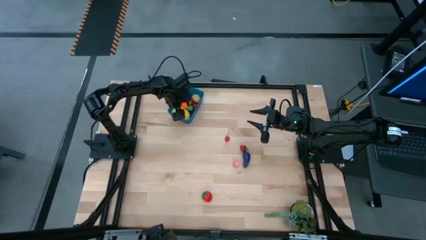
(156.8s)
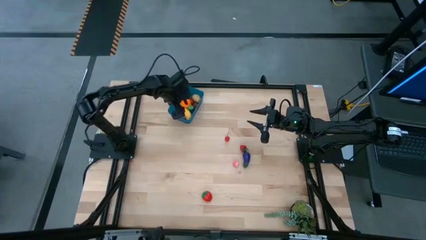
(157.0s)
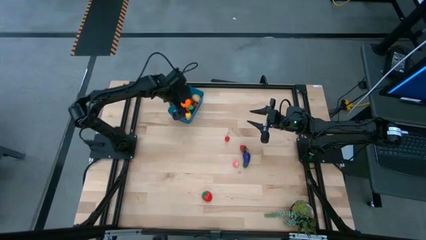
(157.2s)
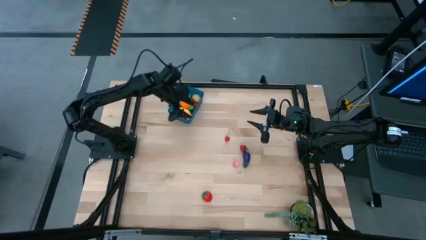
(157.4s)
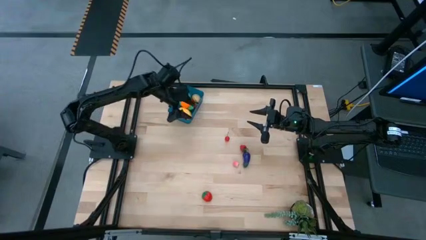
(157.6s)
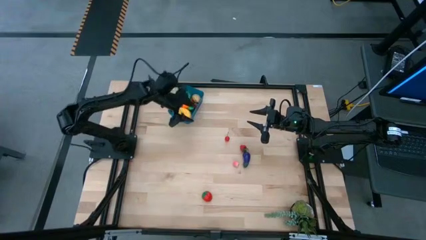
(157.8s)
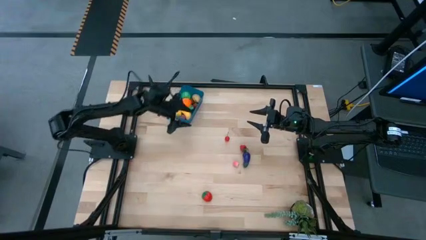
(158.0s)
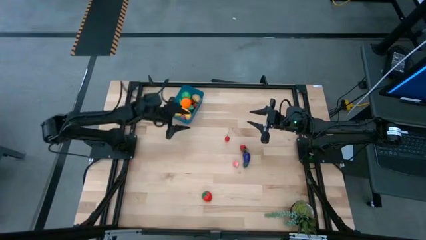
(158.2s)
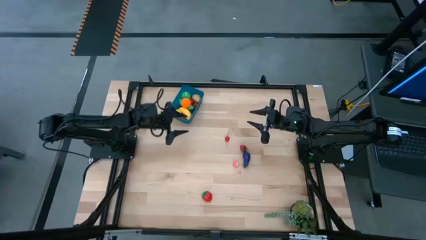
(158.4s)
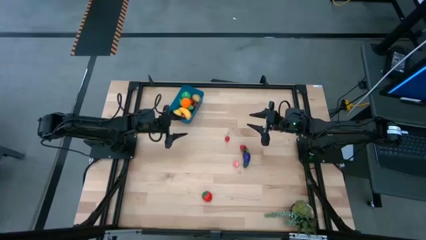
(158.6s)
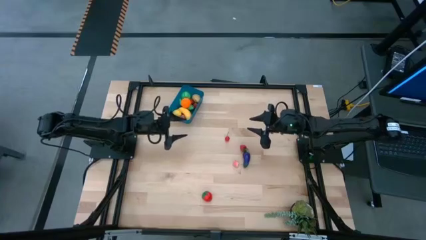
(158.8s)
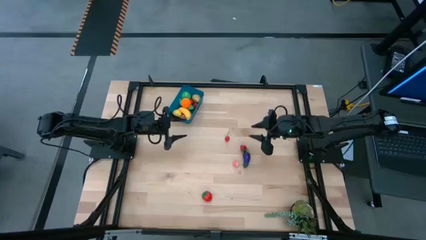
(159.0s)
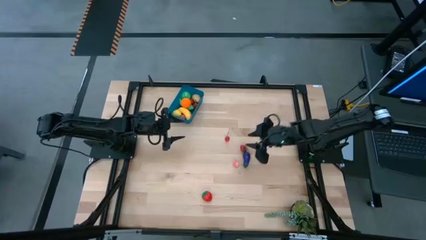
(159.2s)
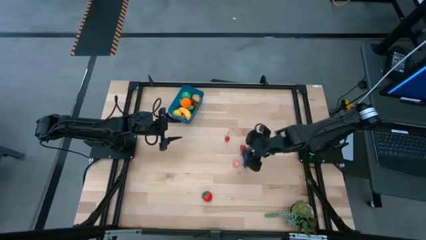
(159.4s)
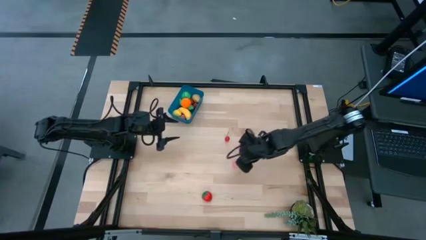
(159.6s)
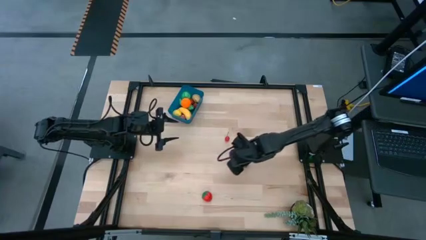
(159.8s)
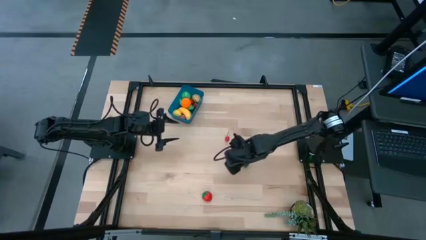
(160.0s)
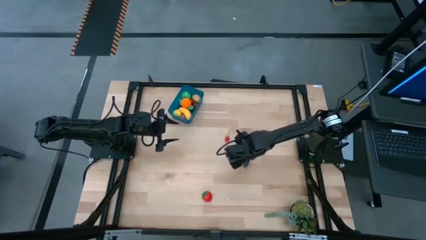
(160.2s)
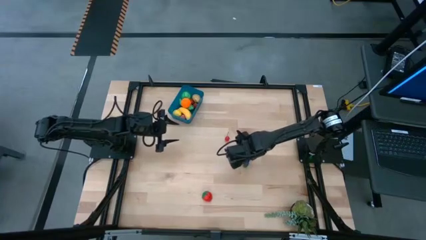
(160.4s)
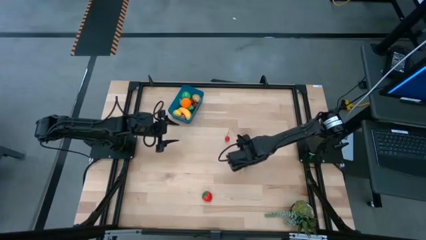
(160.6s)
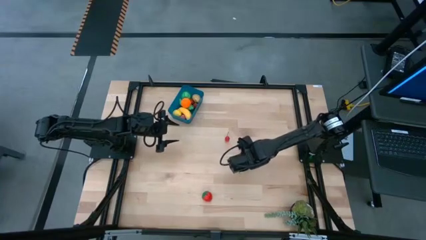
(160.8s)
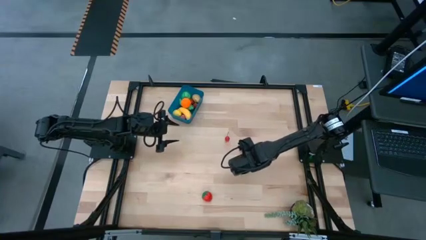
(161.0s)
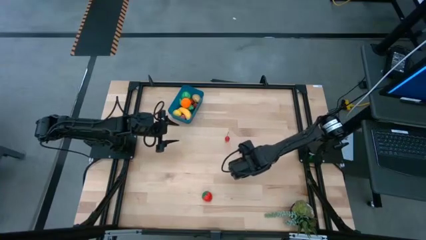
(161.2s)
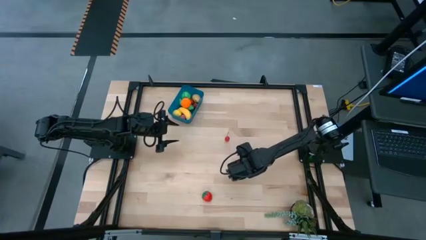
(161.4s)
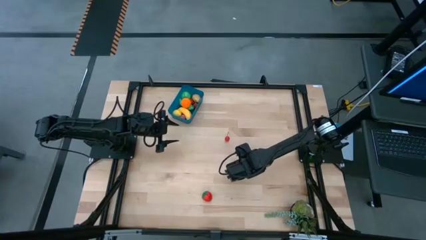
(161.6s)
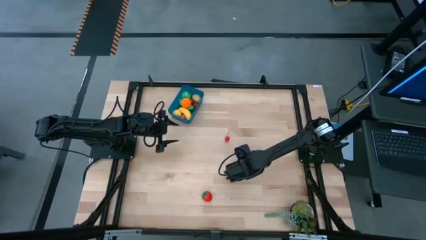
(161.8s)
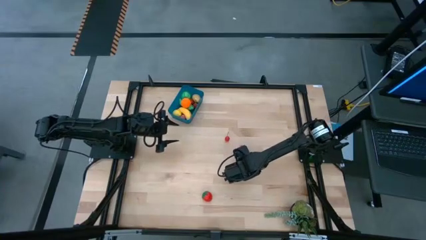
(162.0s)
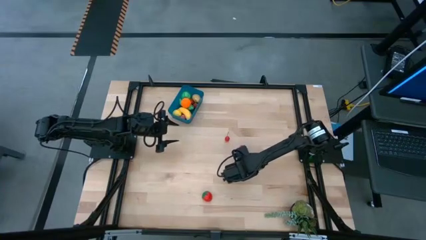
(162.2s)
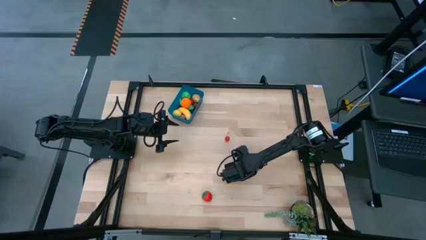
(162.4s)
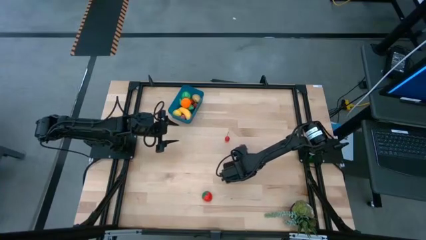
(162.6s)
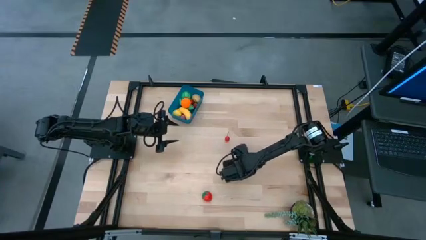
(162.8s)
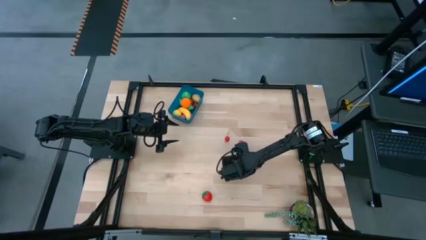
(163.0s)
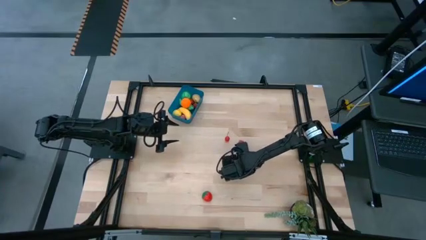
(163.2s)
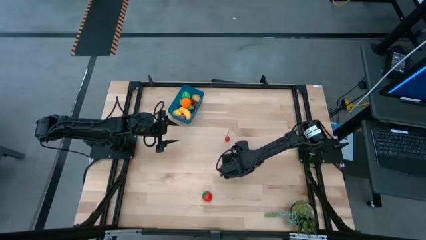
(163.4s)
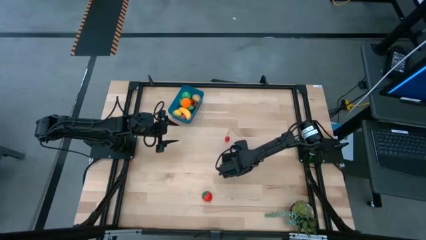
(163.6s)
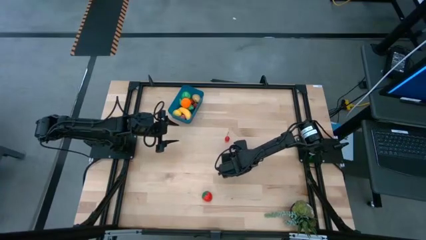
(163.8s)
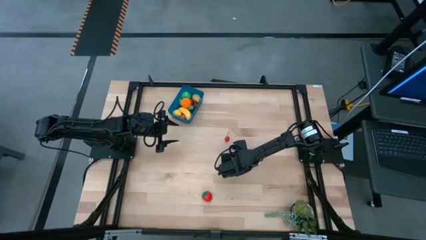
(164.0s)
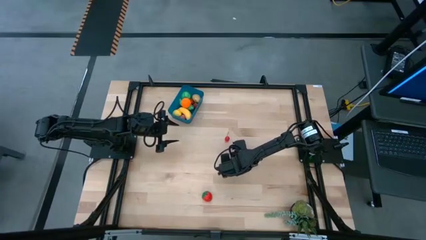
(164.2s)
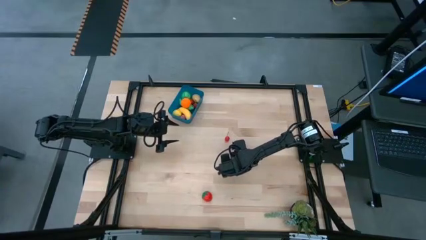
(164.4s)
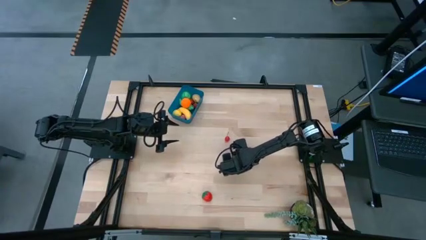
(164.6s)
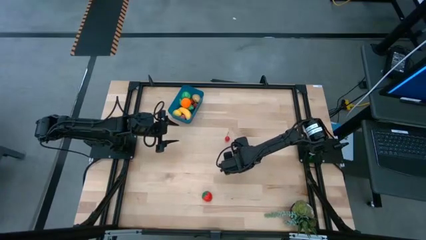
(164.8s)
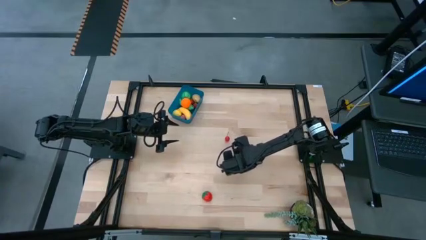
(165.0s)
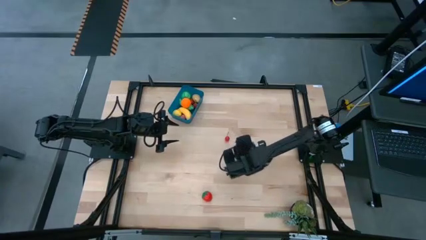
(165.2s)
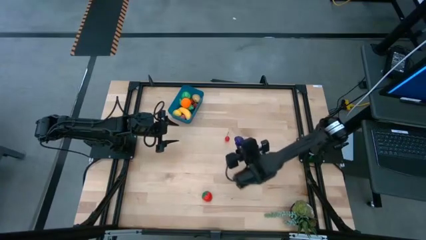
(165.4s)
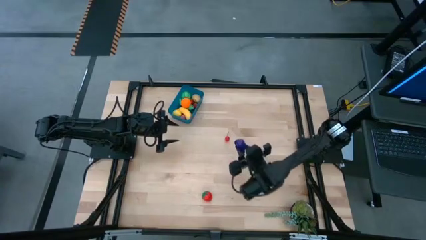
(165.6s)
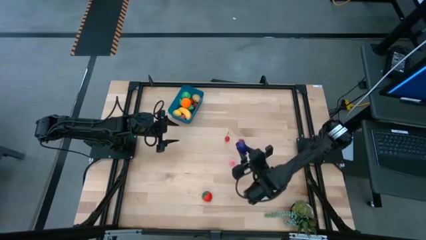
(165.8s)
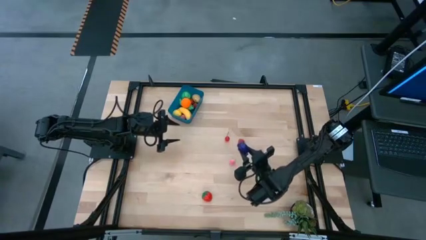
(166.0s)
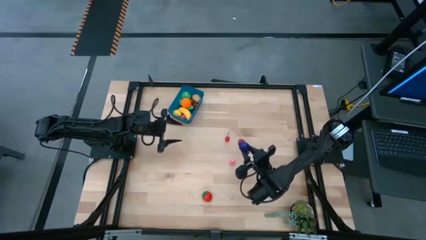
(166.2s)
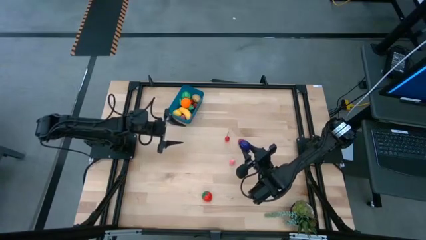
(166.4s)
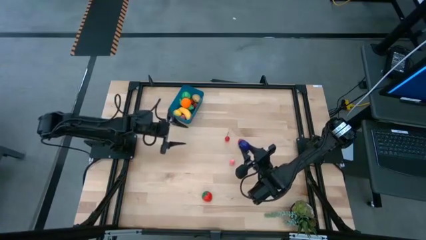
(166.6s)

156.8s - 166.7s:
Task: Pick and placing Produce into tupperware
Put the violet eggplant into the blue bin

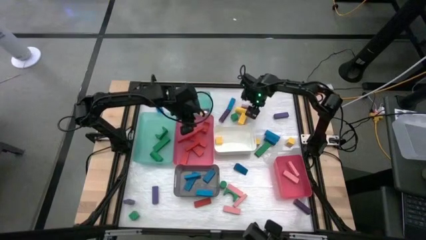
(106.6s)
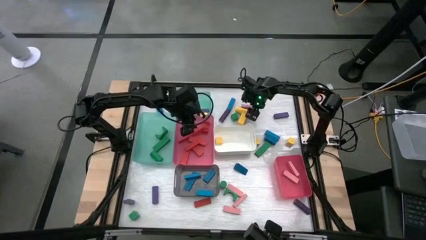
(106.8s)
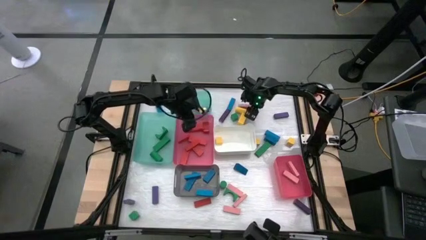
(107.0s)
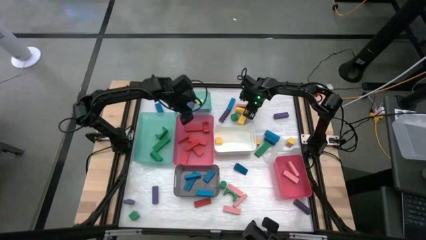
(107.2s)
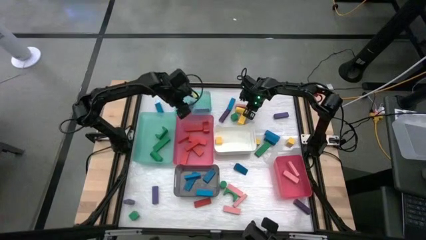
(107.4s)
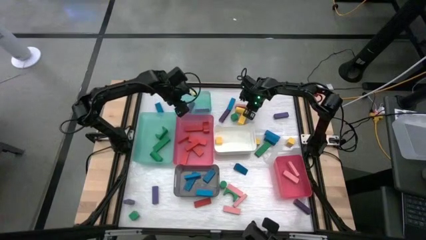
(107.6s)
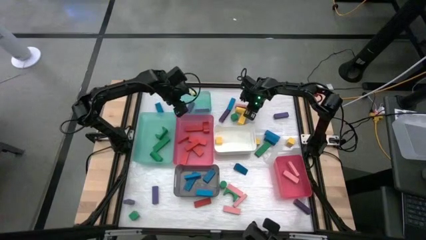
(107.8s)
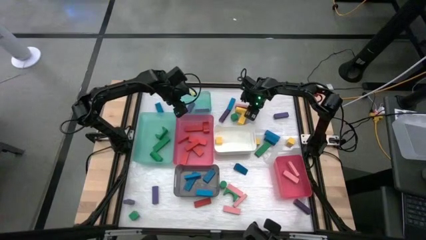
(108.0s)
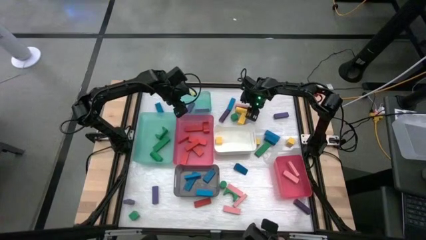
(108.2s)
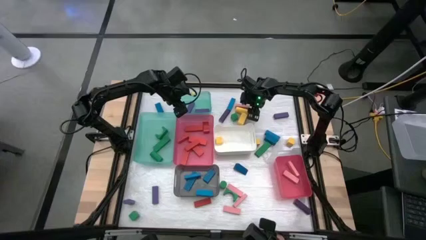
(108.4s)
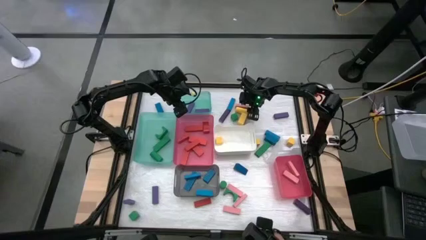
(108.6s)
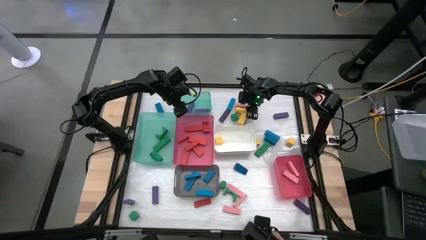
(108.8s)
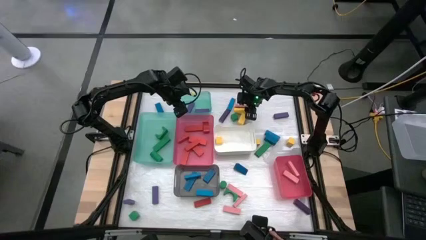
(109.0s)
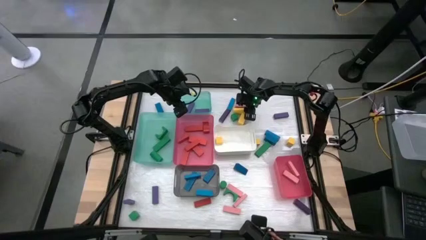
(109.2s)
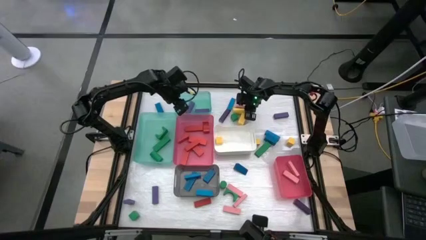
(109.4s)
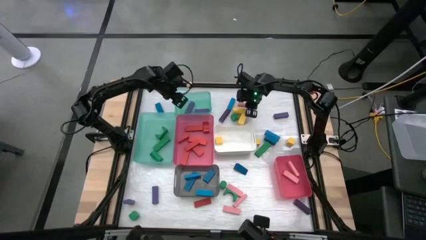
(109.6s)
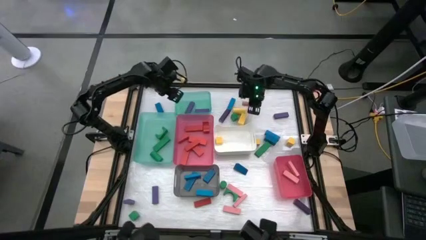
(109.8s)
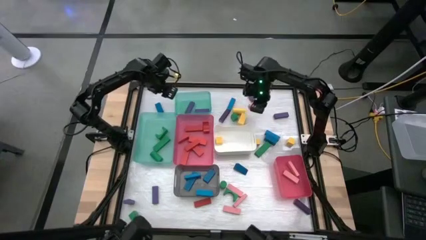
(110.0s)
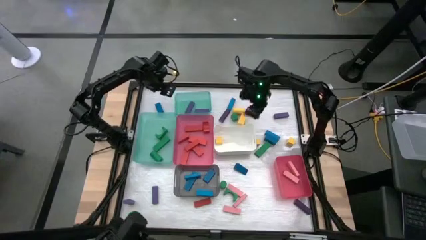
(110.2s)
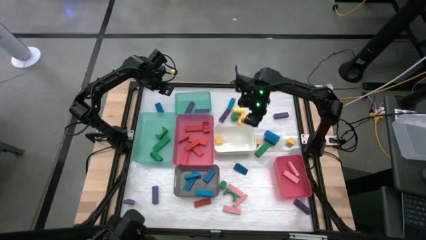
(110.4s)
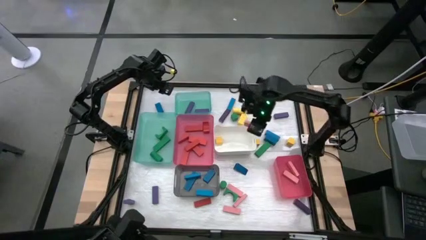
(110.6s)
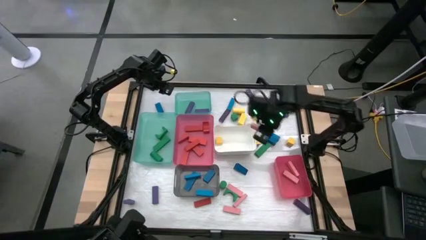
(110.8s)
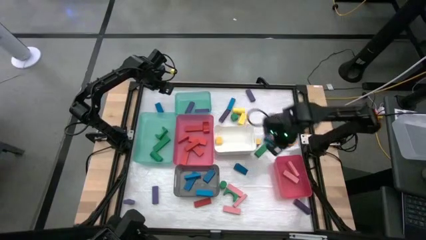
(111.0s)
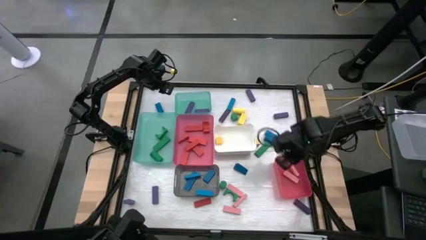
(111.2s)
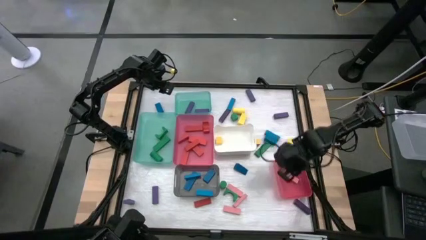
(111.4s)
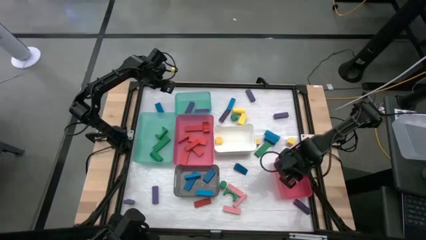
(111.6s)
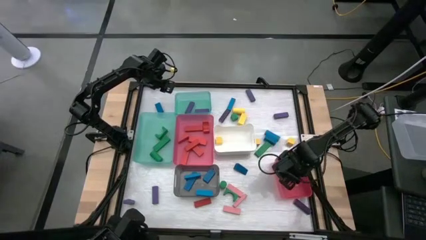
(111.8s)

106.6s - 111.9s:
Task: Sort blocks
Put the pink block into the bottom pink bin
